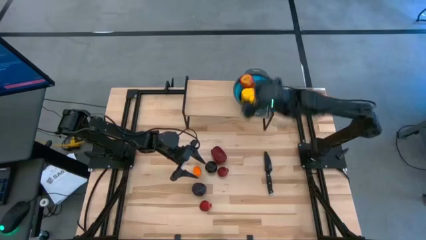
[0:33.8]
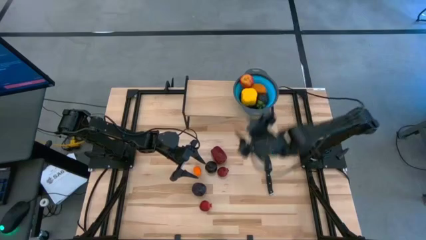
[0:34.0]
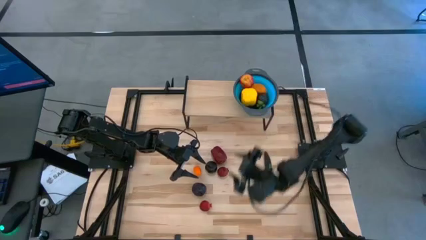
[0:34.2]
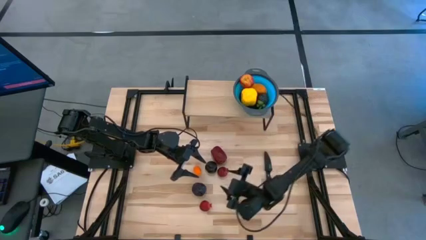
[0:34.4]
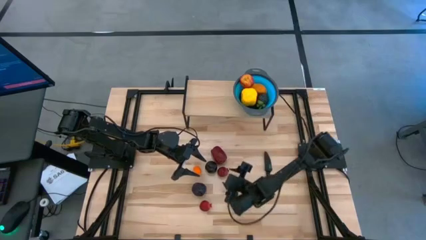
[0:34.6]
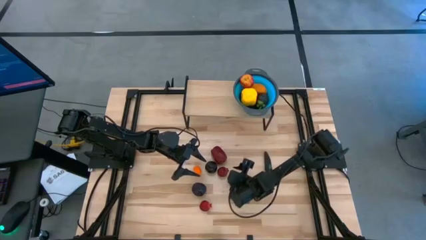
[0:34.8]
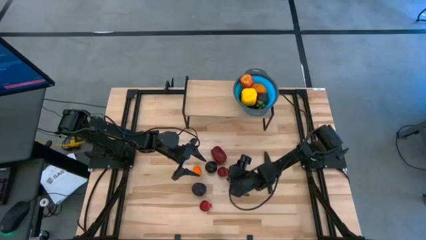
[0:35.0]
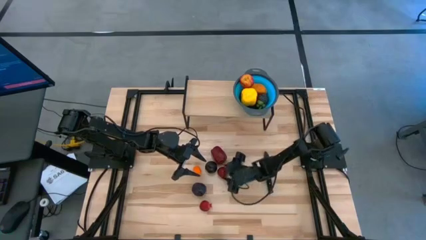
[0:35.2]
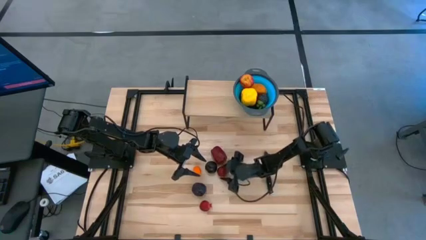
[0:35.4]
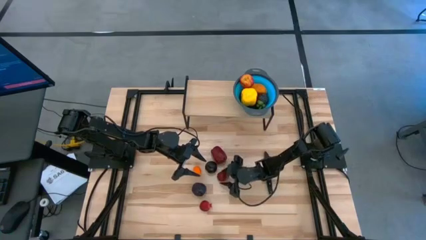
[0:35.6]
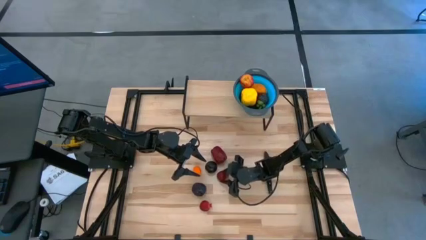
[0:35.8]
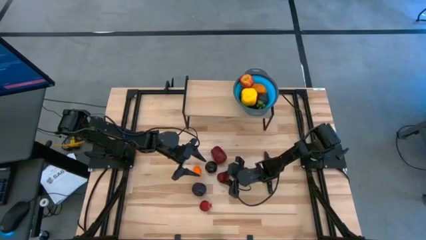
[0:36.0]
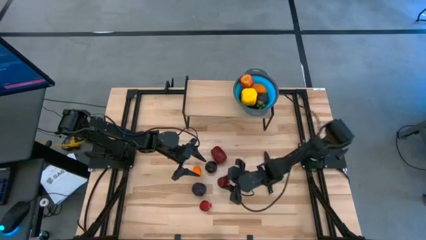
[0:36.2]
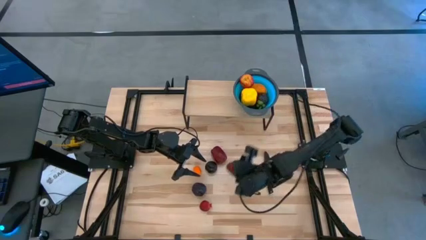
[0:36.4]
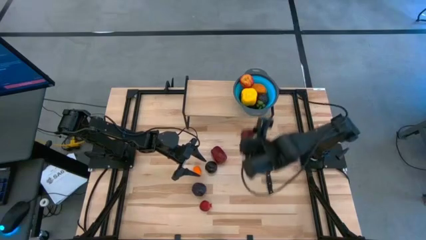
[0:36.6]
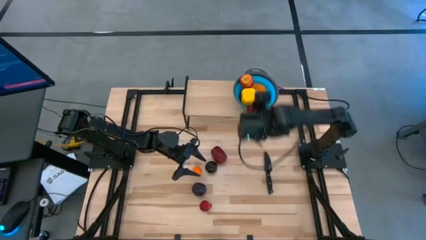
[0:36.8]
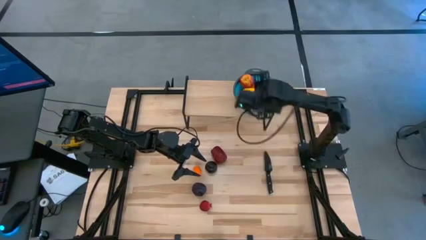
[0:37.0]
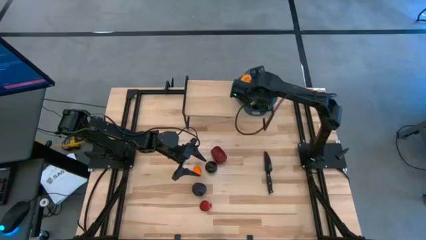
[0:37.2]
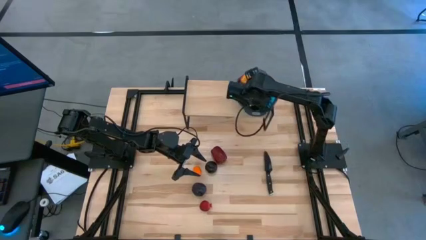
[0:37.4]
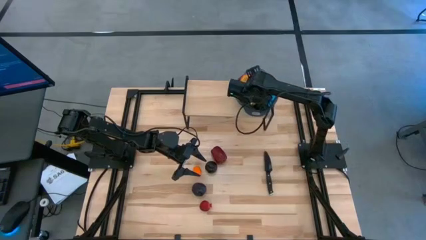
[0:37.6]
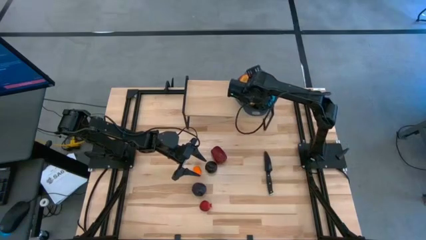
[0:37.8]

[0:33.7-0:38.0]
Task: Pick & Place Fruit
Put the pomegranate into the strainer bowl

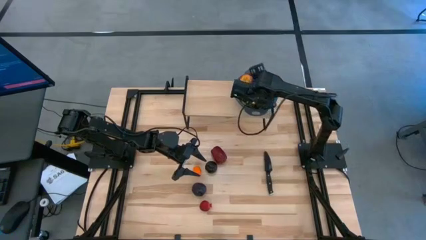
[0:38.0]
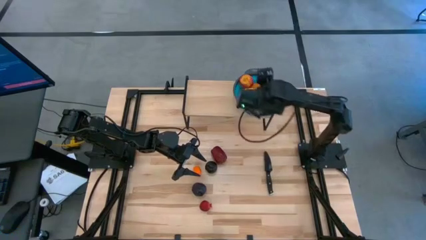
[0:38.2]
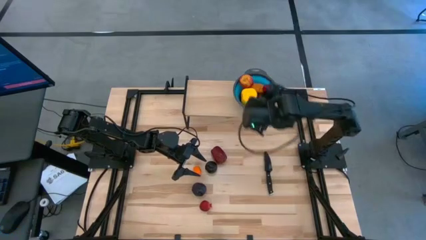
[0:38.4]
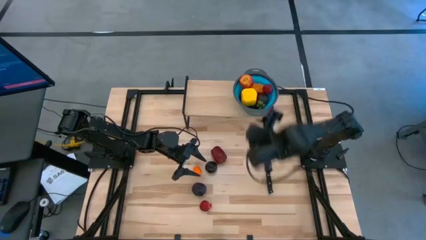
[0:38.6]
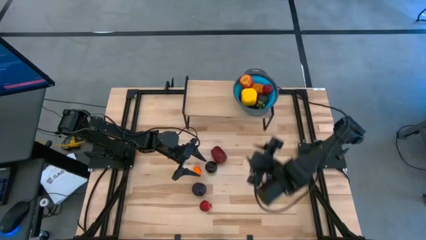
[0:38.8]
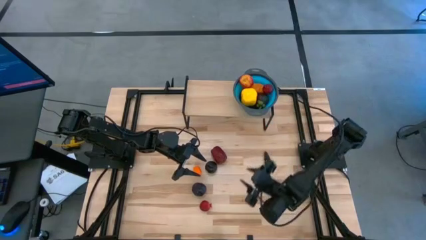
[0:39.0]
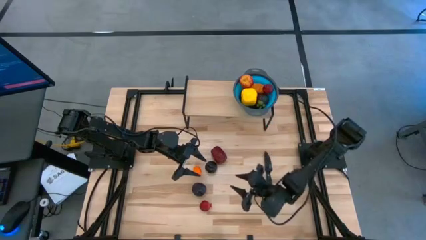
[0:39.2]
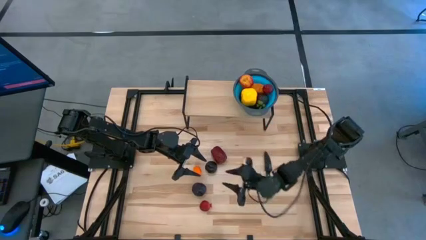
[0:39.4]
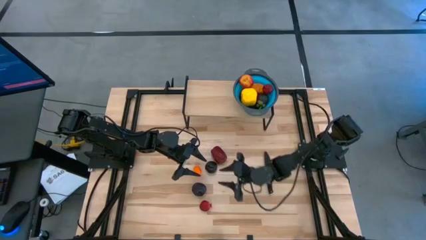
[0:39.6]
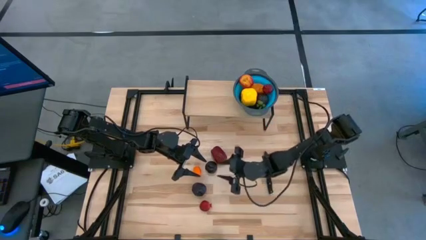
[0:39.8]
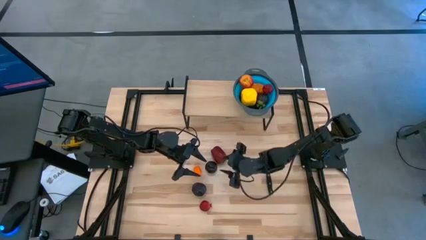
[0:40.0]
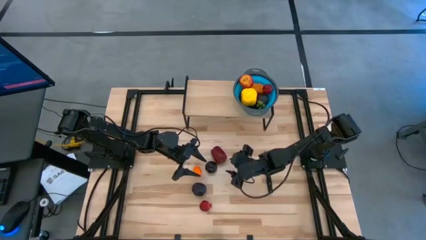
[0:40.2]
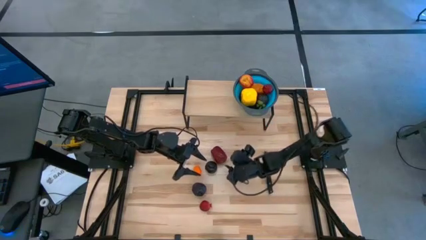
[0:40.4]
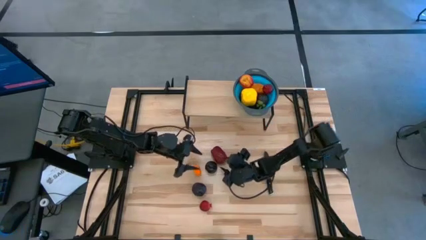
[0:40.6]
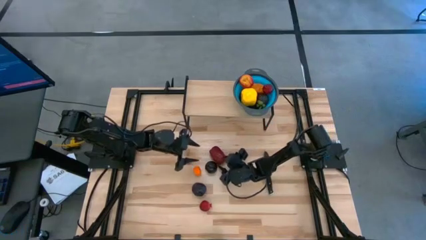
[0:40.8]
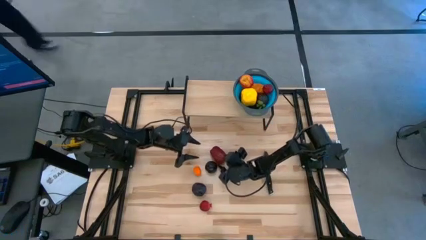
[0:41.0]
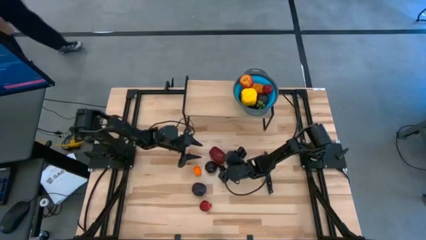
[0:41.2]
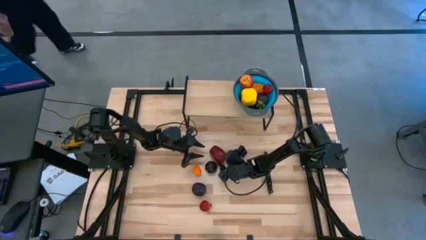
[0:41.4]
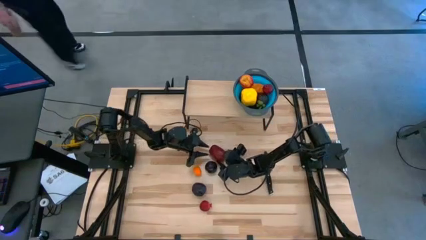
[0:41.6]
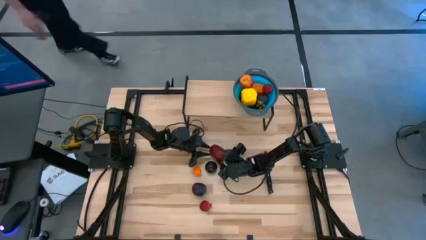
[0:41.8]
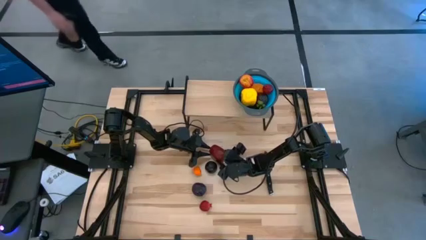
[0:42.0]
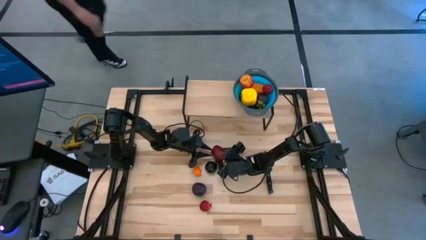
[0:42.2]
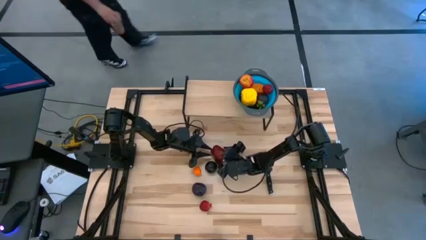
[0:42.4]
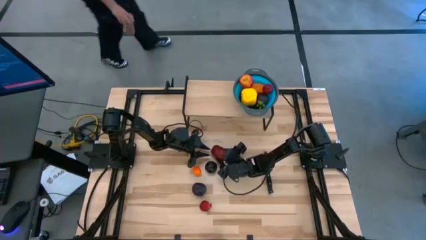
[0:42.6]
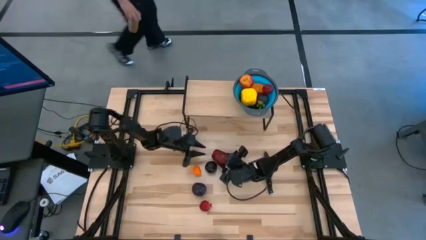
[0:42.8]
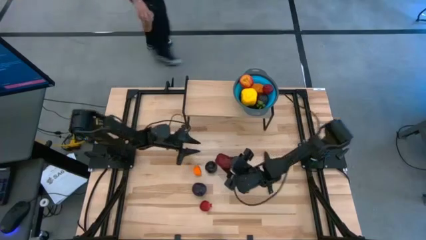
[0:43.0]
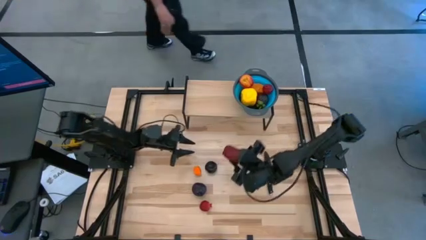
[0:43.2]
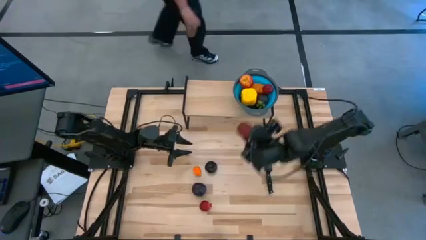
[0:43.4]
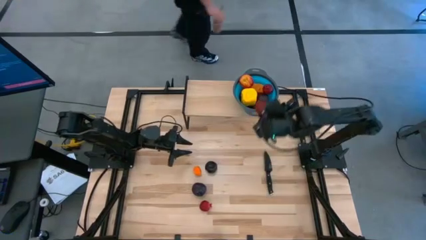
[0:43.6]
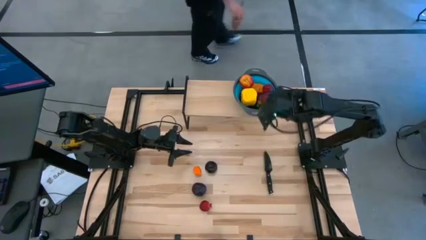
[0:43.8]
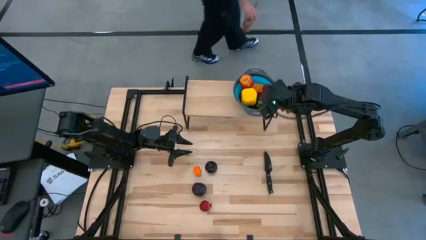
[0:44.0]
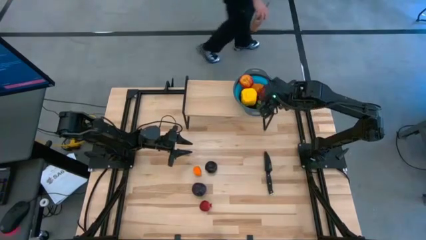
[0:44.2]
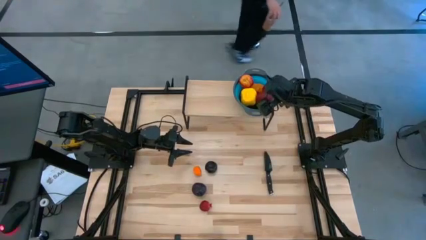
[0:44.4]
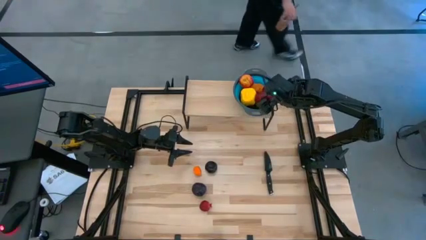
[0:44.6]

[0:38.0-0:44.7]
Put the apple into the strainer bowl

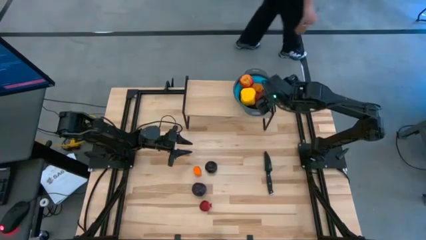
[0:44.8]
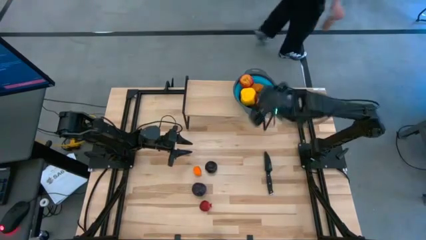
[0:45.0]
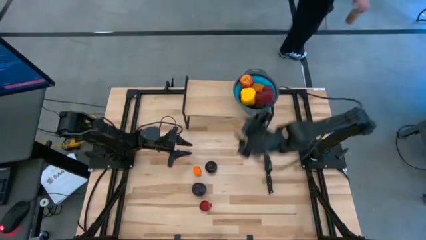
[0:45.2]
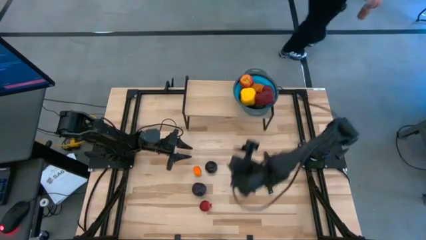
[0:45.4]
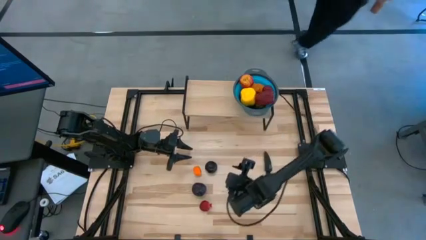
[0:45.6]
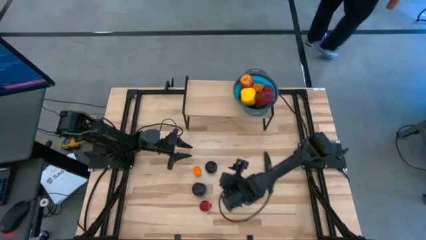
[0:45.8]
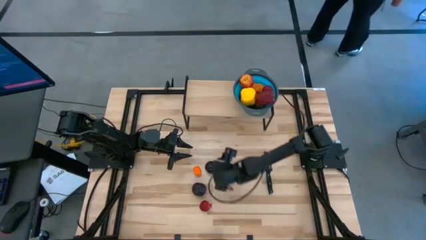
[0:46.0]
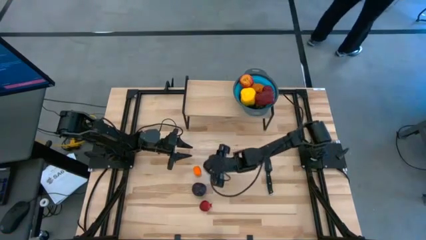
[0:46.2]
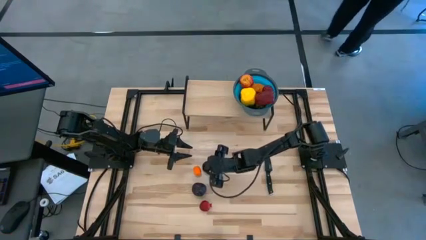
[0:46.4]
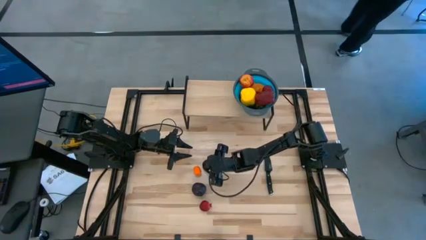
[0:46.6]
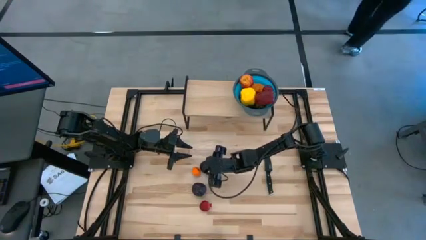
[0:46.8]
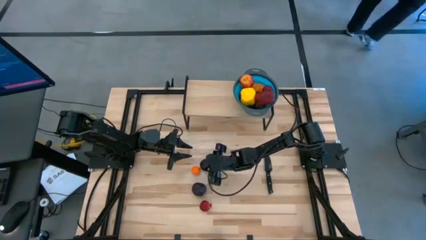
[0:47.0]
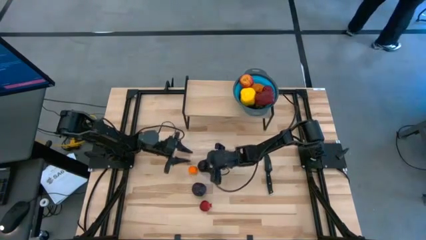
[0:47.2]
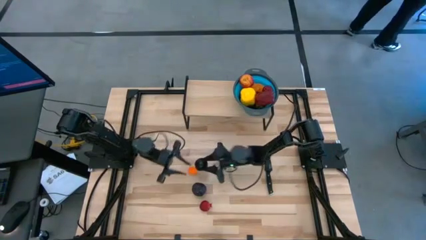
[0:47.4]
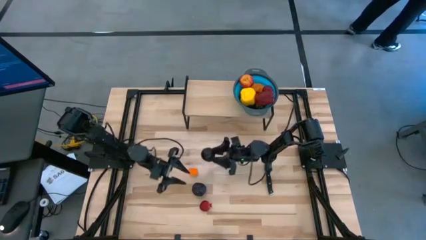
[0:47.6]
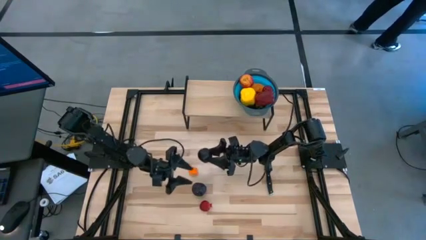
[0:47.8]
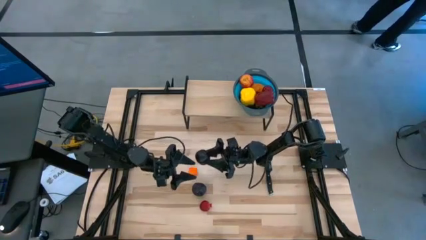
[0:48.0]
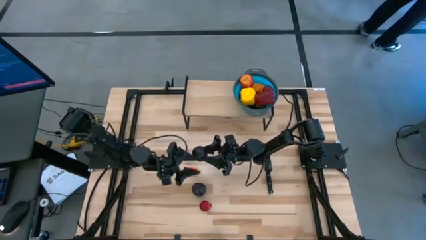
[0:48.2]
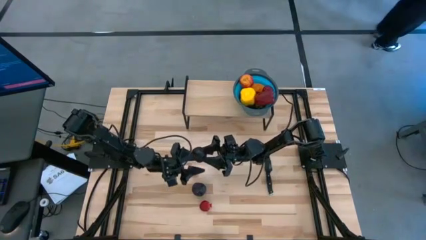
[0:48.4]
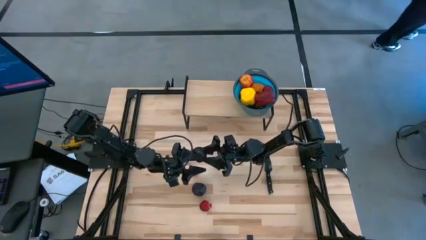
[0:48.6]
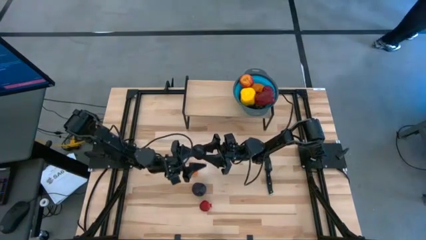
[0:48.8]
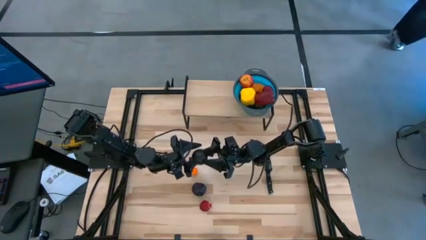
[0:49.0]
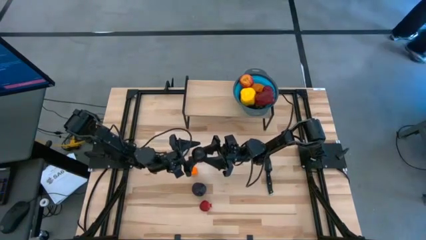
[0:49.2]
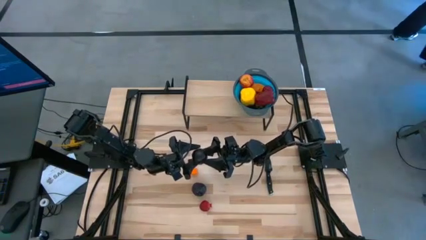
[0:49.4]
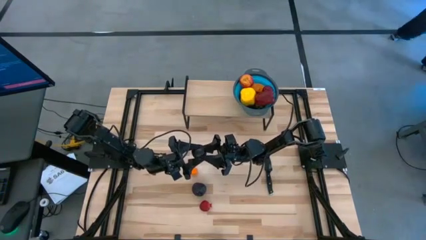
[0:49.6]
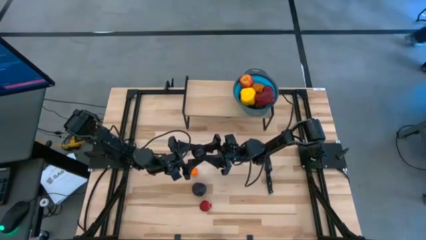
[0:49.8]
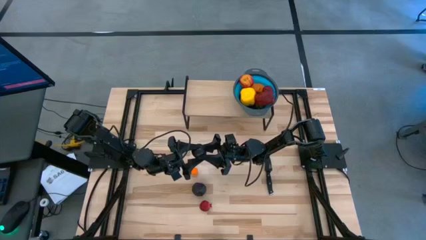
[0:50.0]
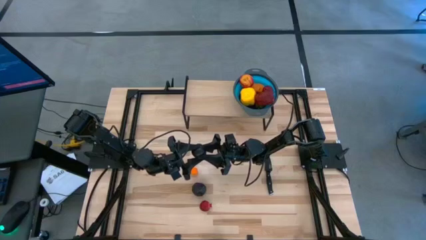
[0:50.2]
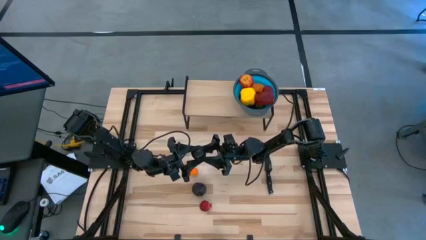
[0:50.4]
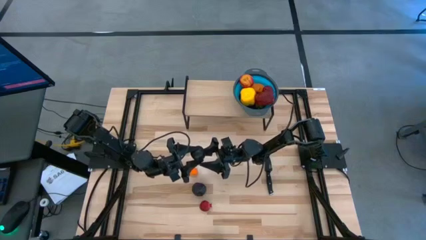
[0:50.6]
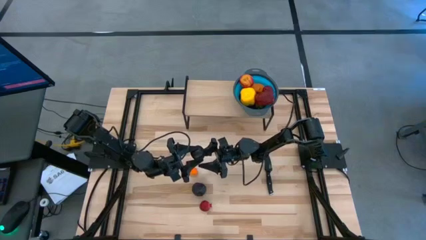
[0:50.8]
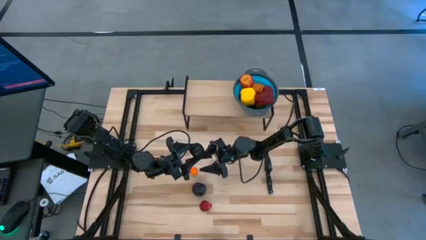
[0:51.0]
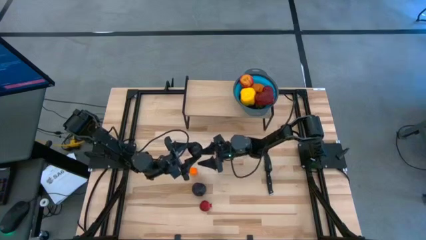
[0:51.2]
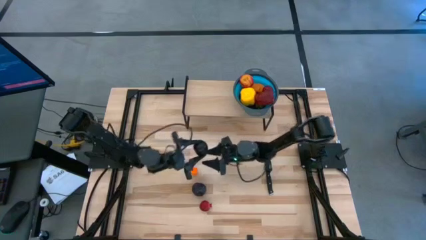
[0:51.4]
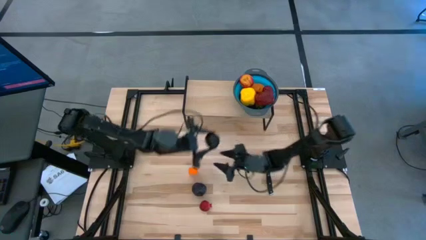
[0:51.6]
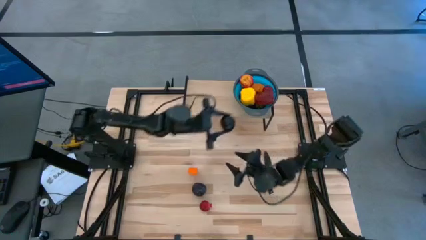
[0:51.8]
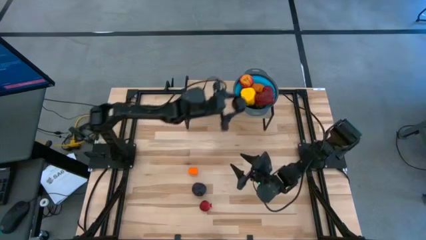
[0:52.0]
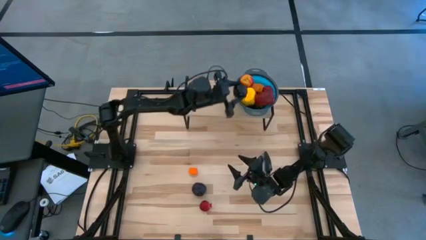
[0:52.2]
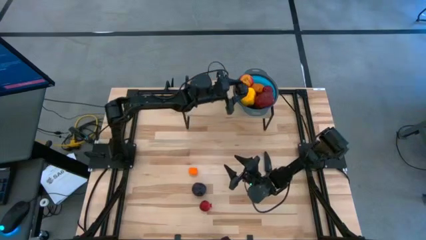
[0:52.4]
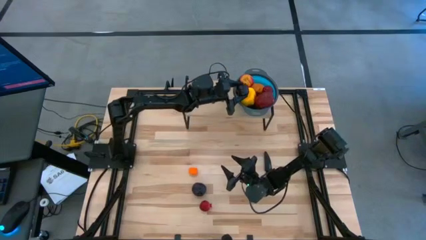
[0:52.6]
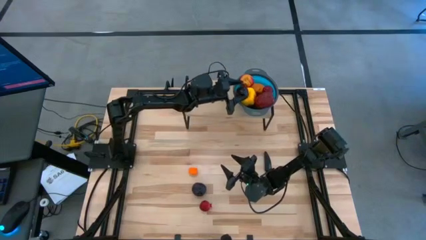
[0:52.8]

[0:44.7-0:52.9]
Put the plum into the strainer bowl
